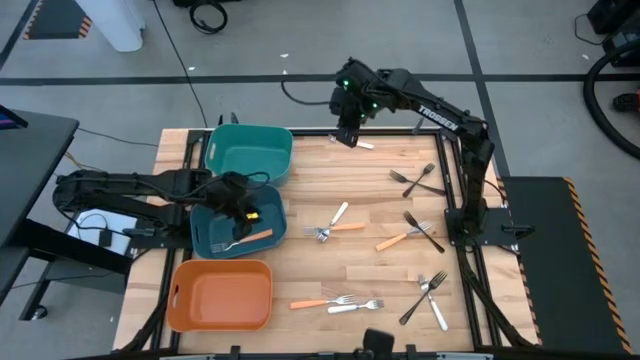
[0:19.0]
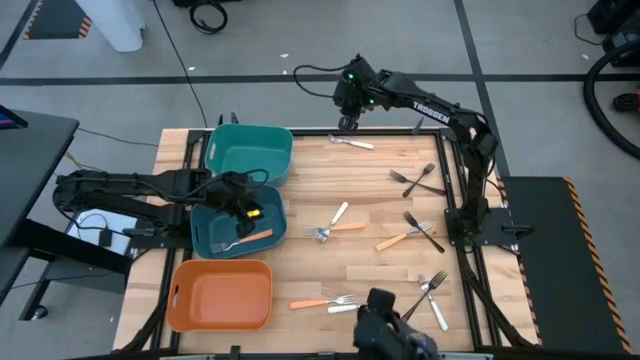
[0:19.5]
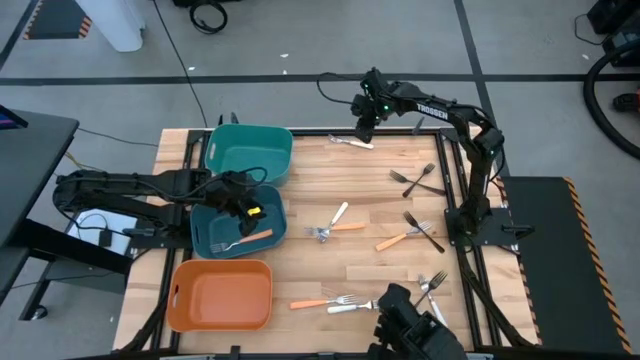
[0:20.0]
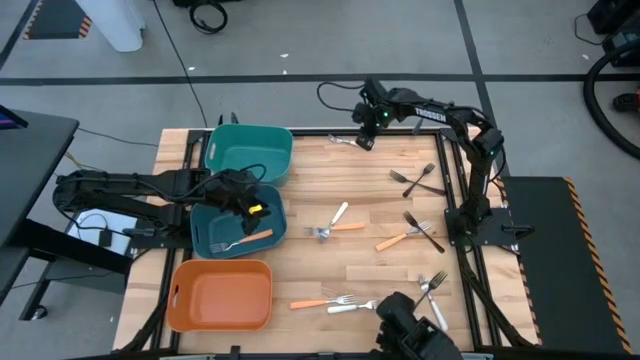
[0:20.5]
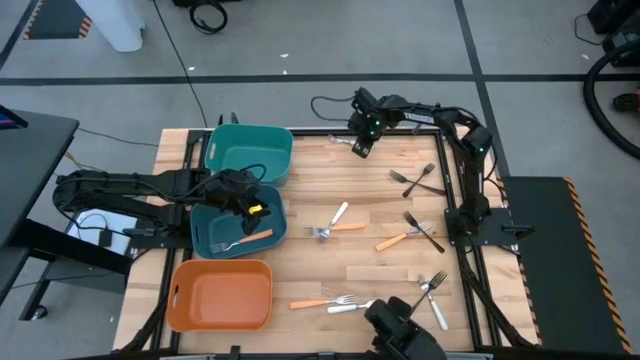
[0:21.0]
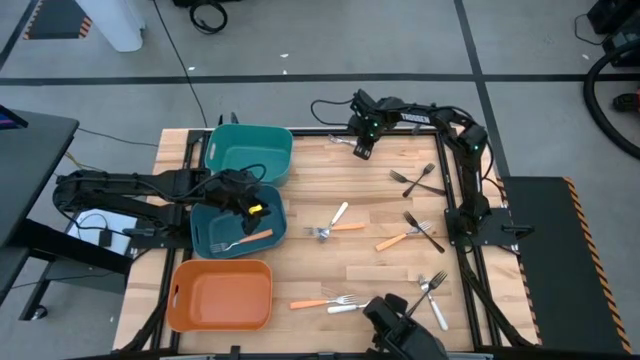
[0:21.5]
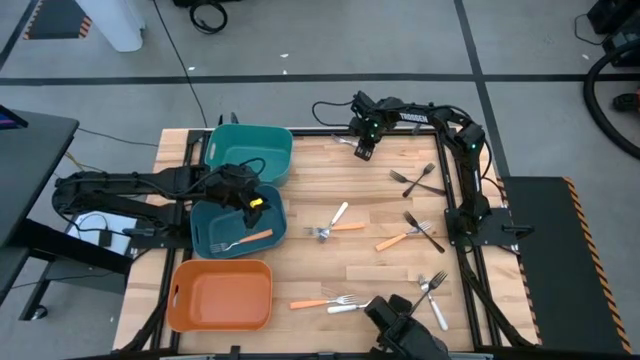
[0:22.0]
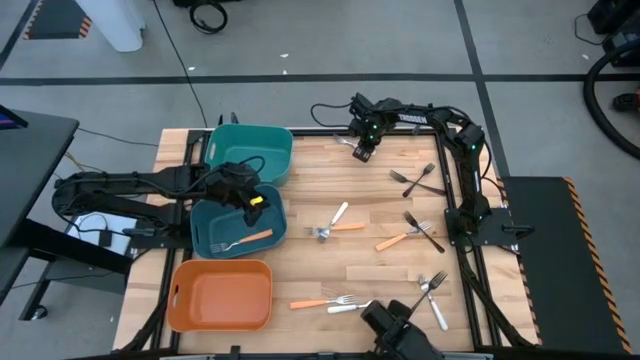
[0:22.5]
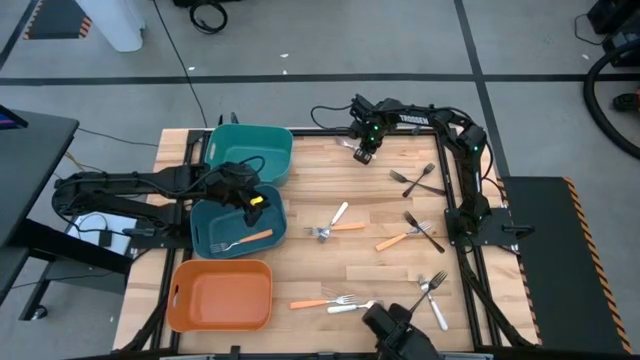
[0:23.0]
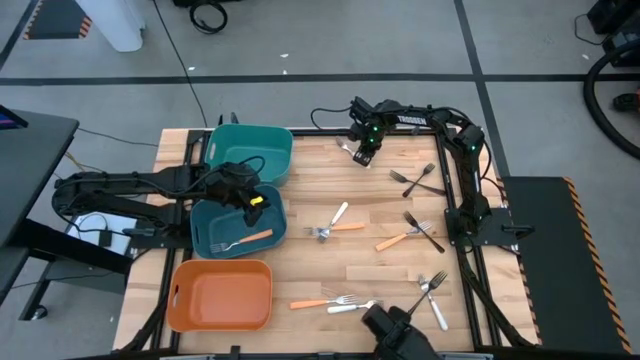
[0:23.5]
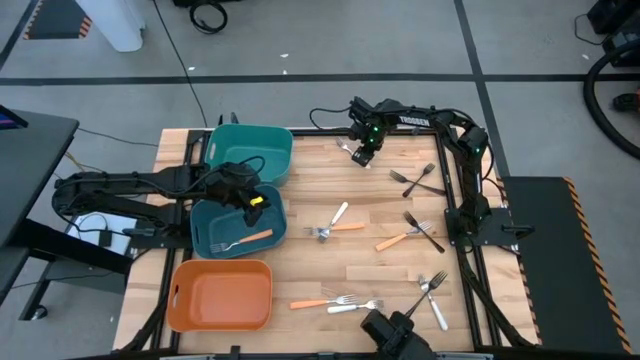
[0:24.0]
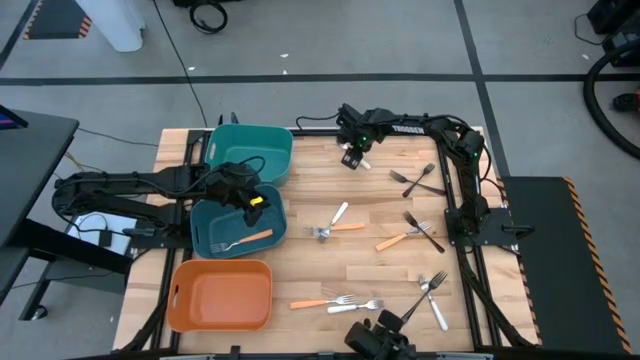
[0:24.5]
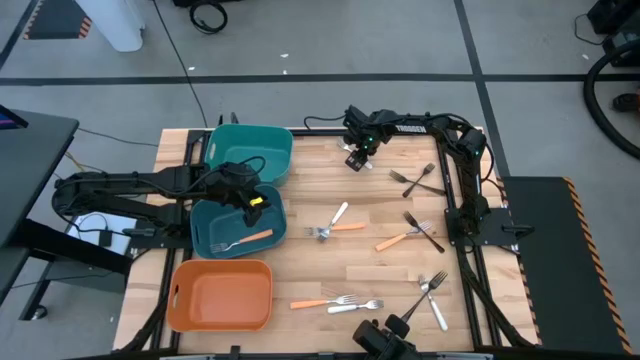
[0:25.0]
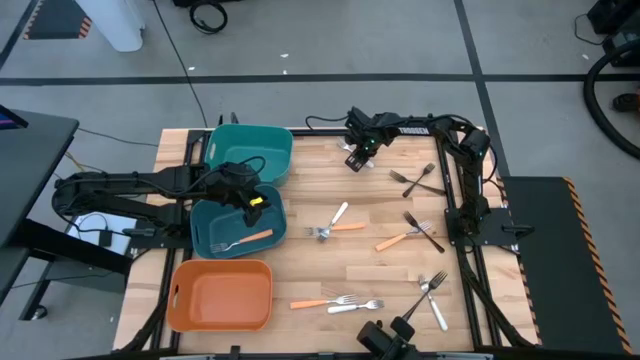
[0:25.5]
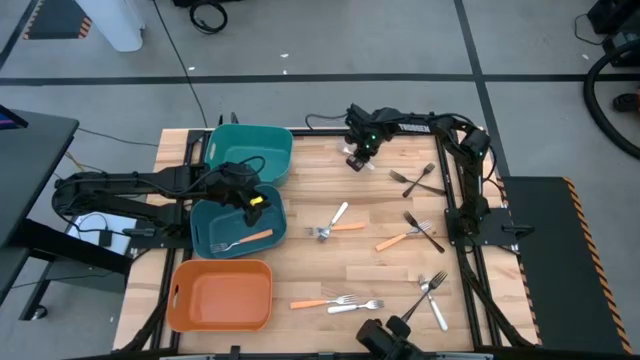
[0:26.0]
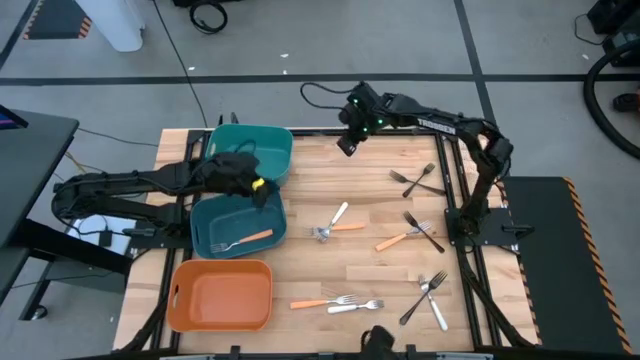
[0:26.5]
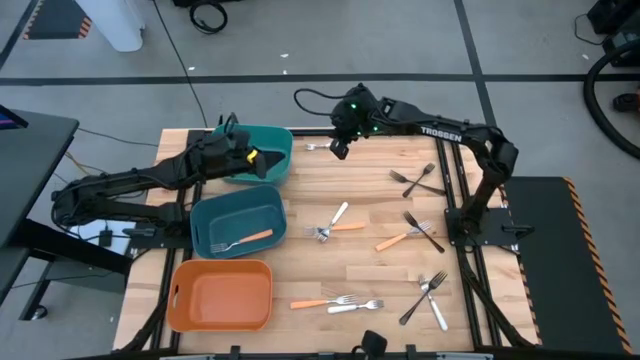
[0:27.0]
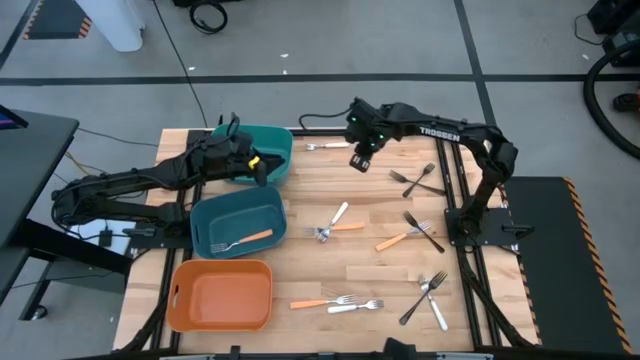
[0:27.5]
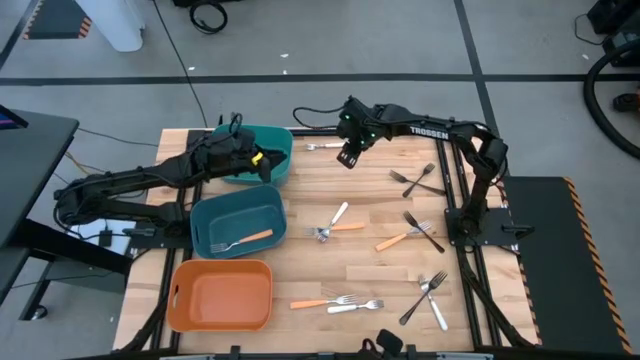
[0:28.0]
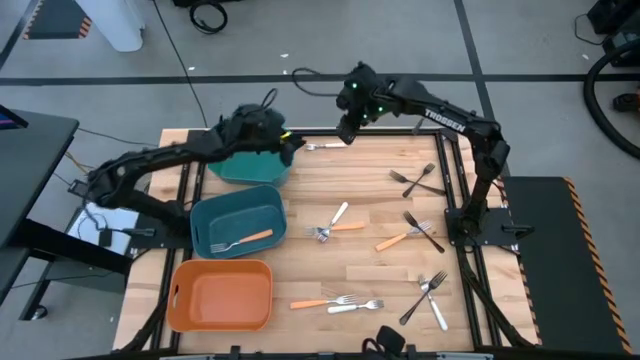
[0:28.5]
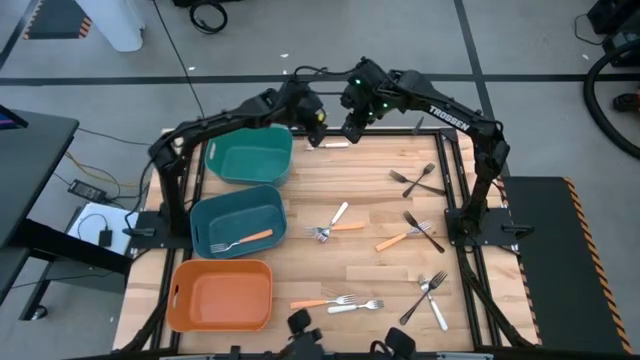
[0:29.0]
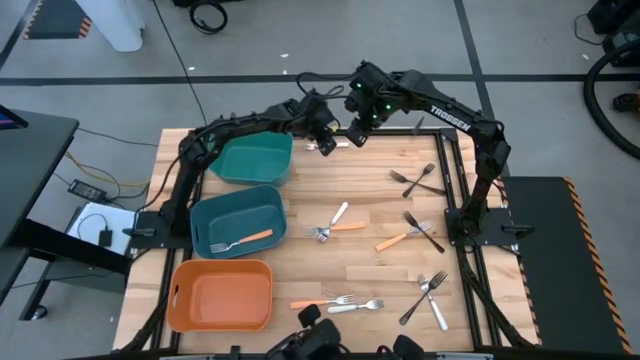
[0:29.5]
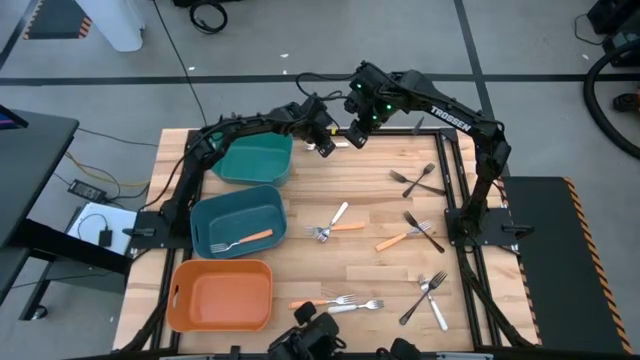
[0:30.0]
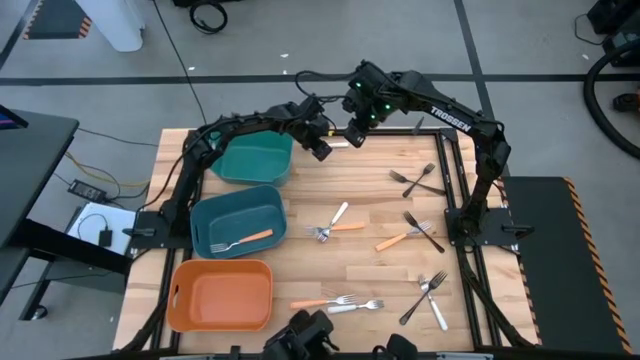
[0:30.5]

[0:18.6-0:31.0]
Task: Sort silverware by color (type)
Put the white fork into the green bin

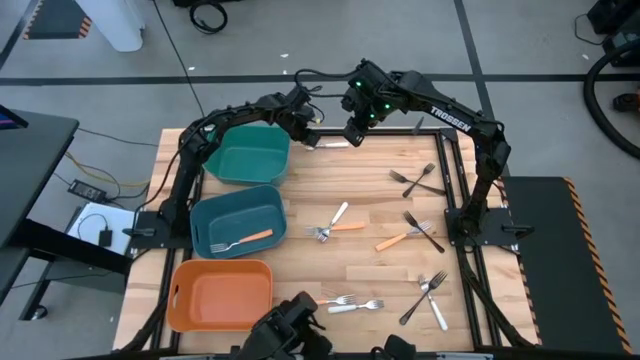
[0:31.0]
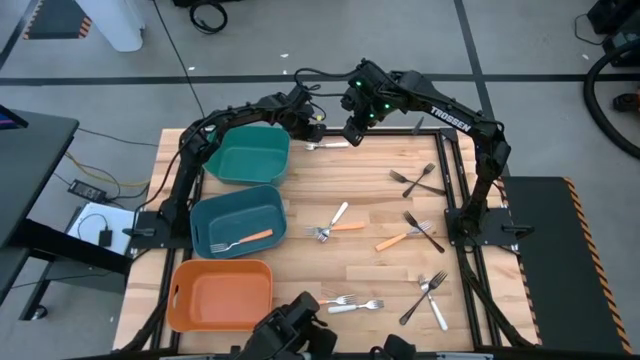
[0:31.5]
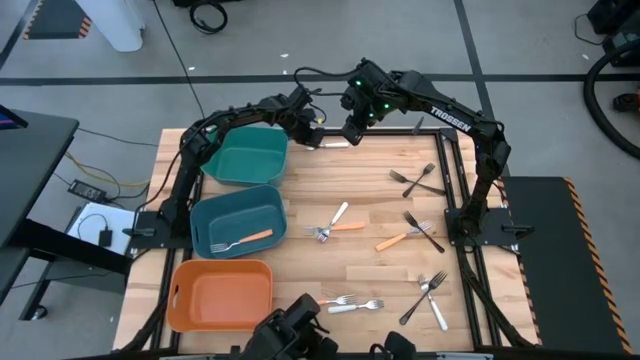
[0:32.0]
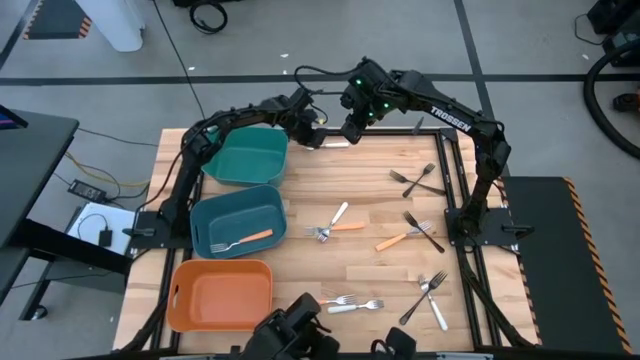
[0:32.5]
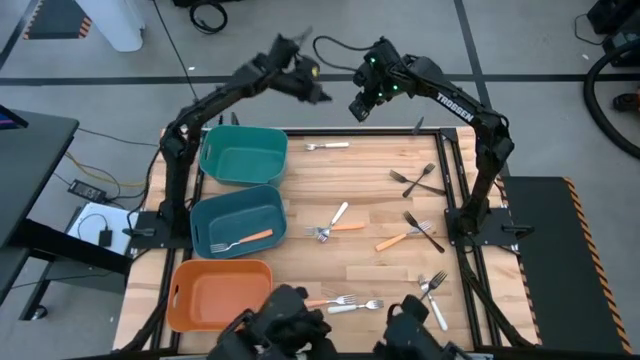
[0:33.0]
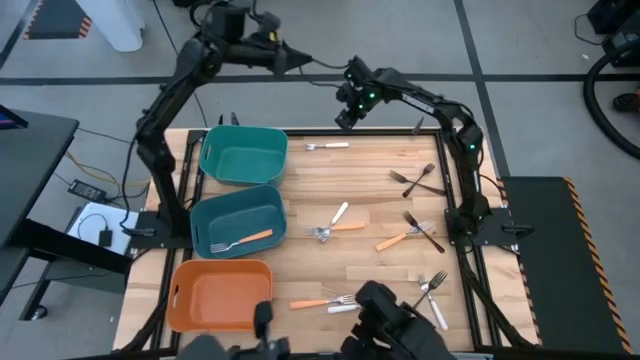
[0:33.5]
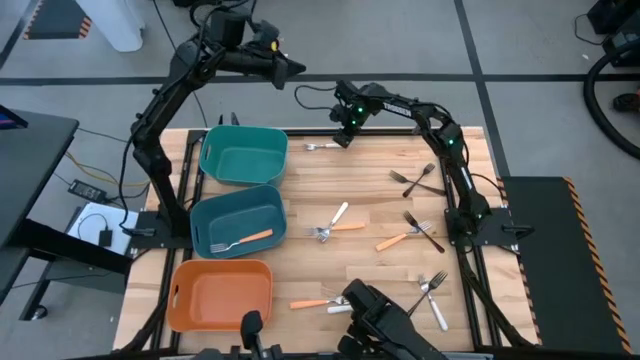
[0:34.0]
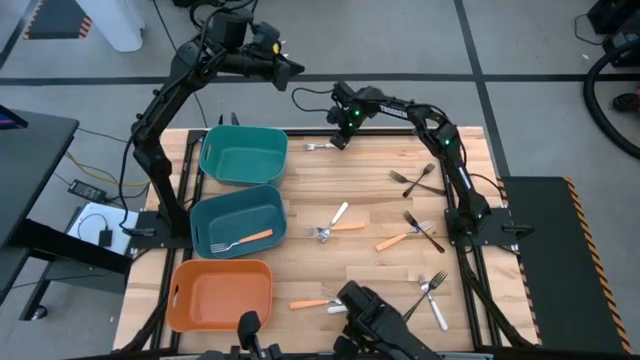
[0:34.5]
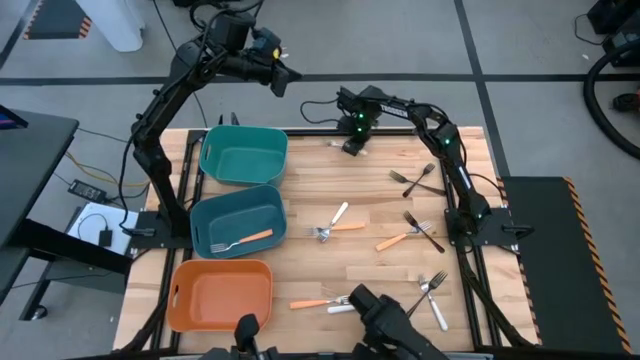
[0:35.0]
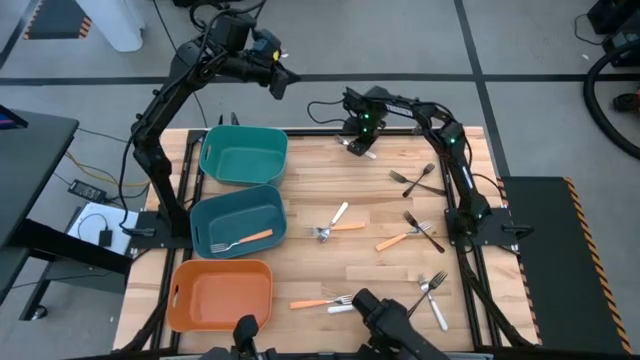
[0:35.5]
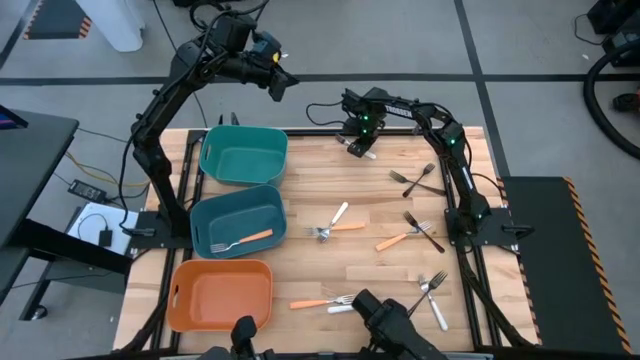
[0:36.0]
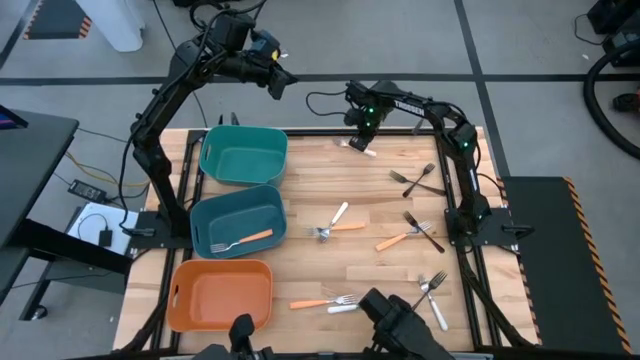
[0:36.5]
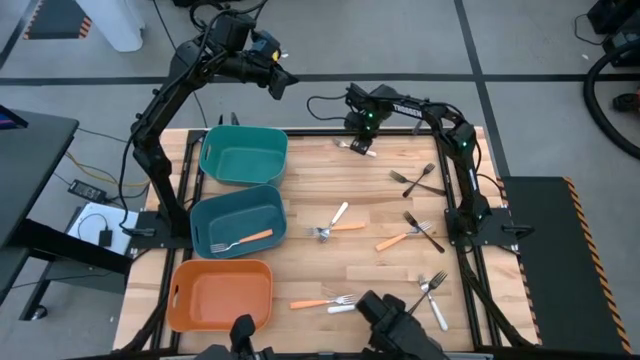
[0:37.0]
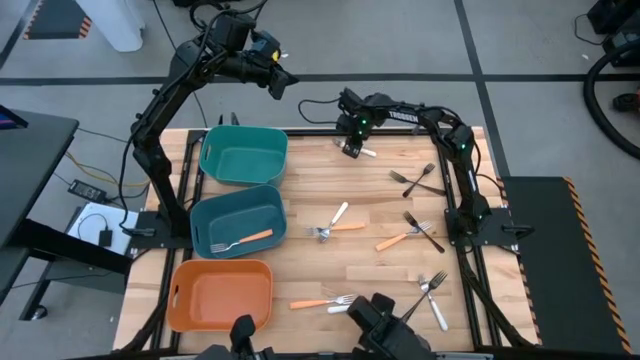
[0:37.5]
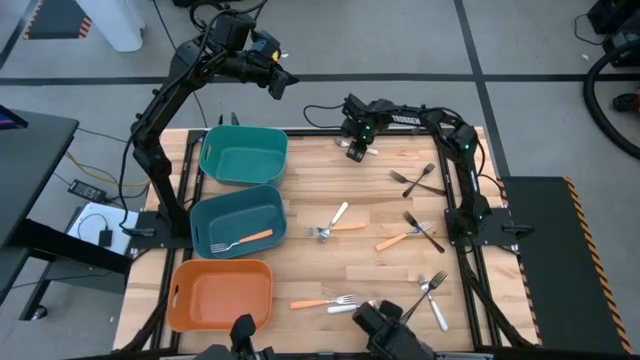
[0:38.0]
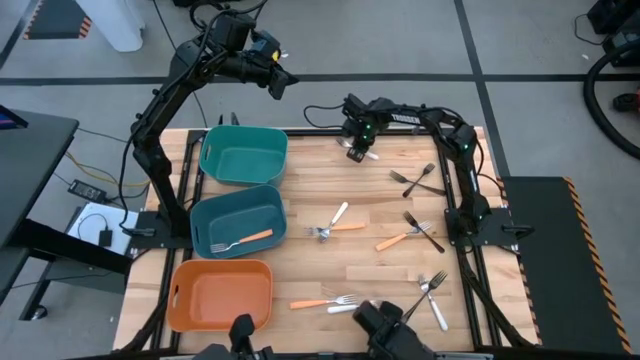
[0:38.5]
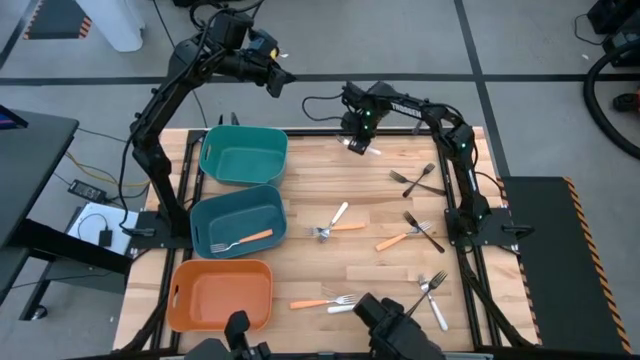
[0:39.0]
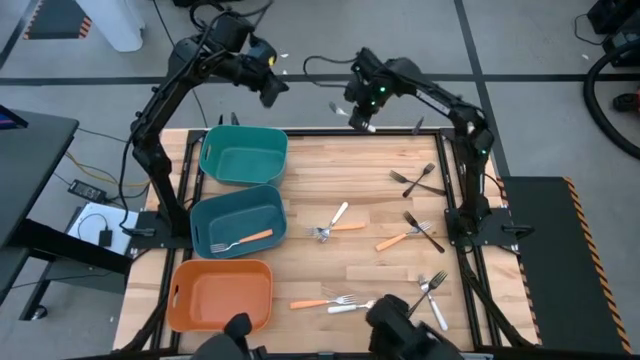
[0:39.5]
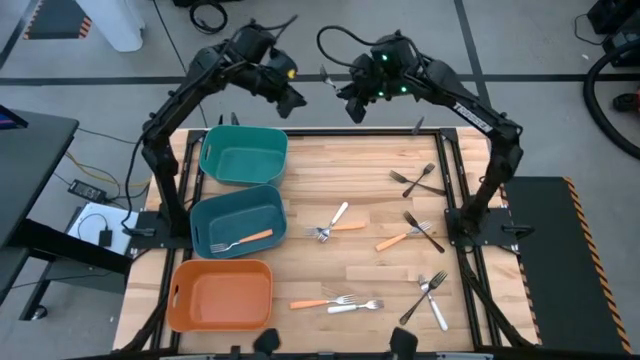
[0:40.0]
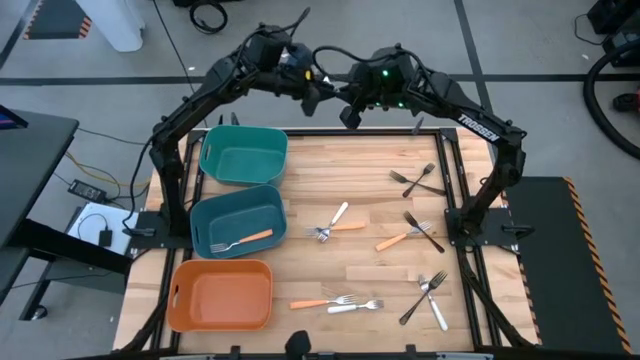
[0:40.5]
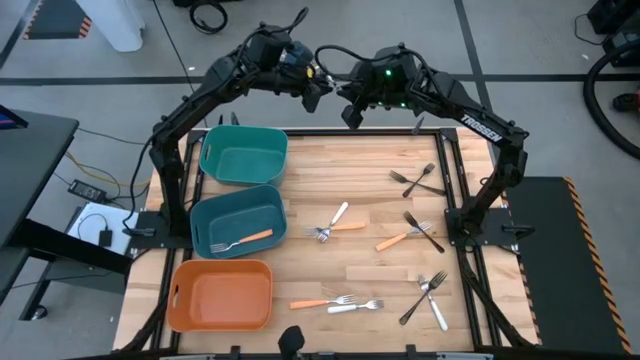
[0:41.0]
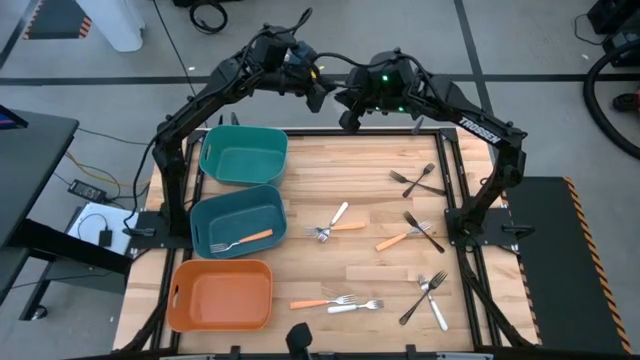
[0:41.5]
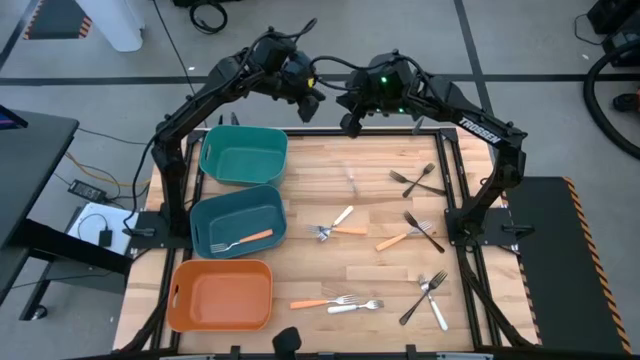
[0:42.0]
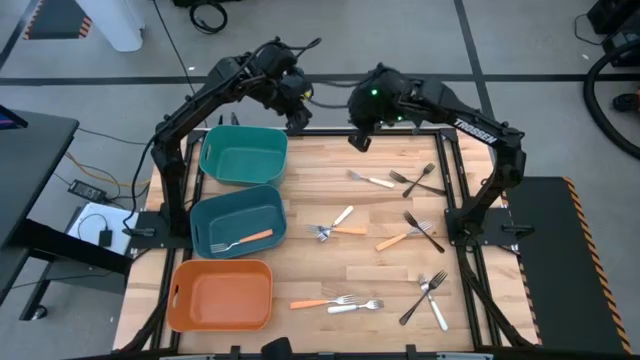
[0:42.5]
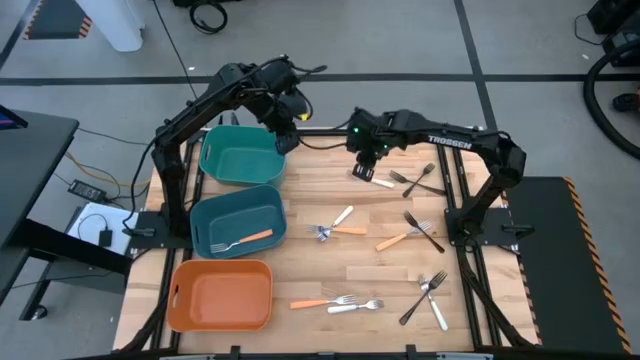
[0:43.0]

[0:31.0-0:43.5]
Put the white fork into the green bin
